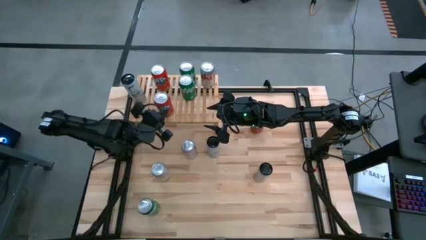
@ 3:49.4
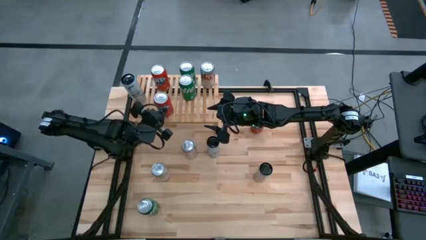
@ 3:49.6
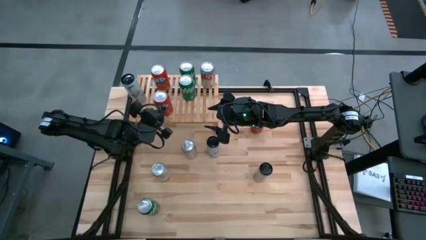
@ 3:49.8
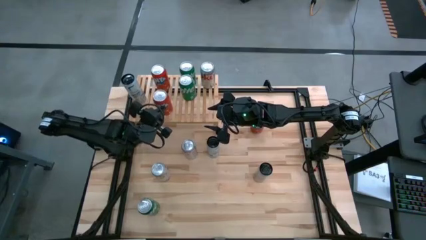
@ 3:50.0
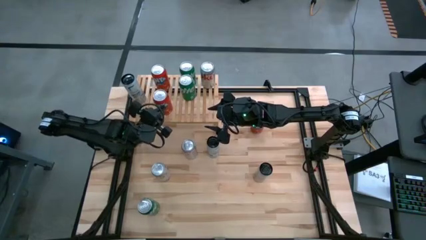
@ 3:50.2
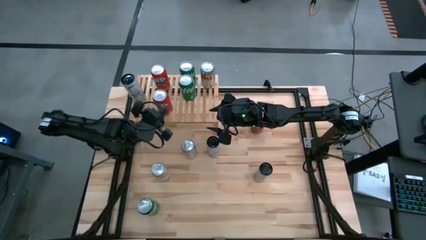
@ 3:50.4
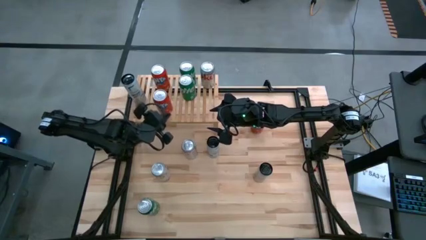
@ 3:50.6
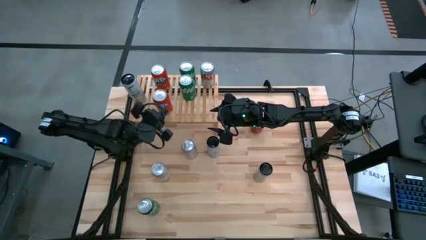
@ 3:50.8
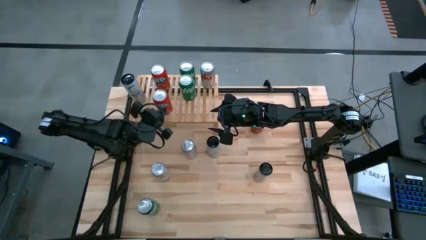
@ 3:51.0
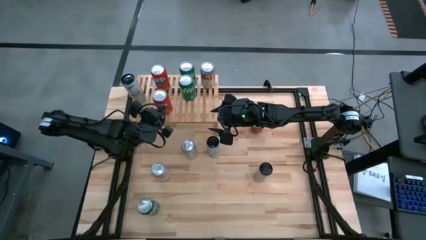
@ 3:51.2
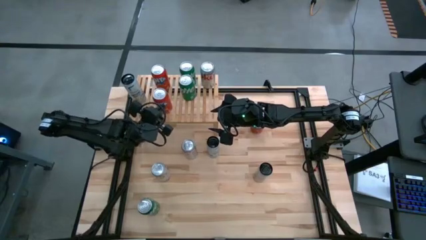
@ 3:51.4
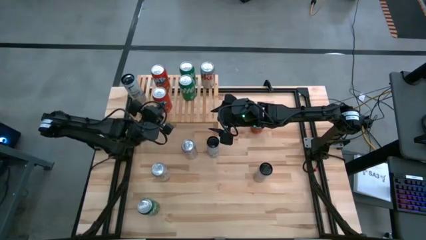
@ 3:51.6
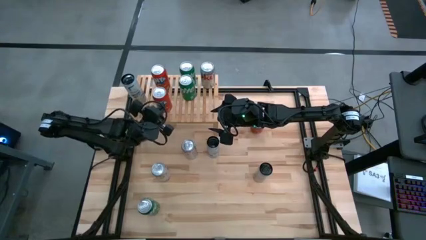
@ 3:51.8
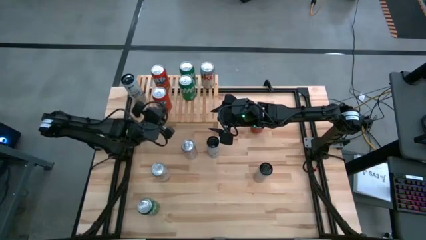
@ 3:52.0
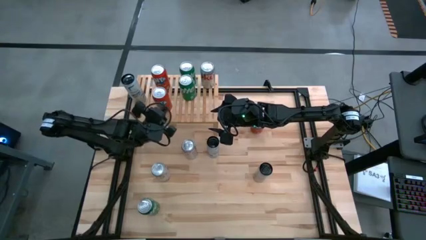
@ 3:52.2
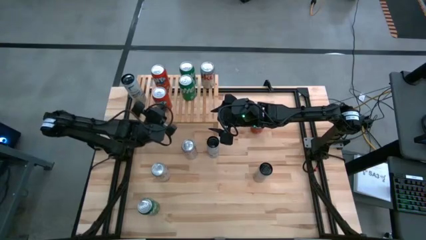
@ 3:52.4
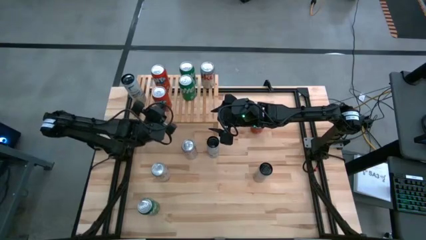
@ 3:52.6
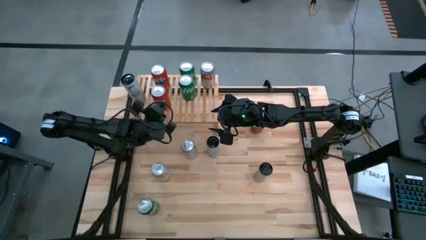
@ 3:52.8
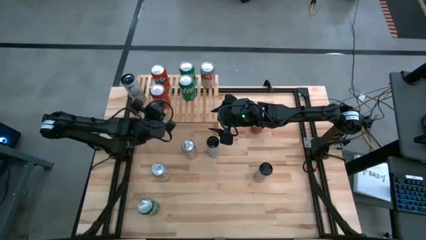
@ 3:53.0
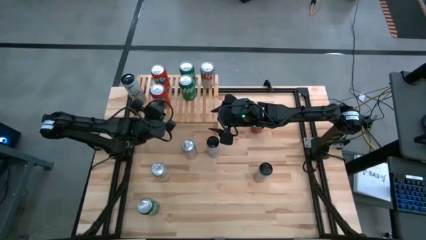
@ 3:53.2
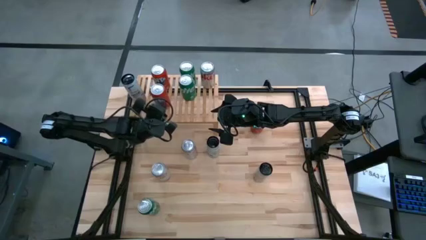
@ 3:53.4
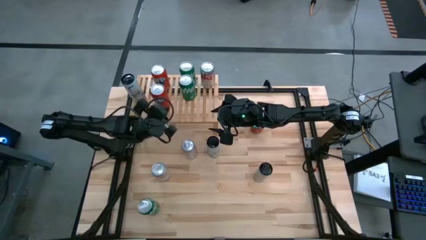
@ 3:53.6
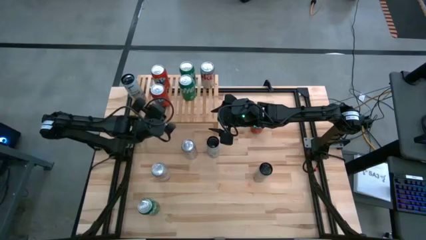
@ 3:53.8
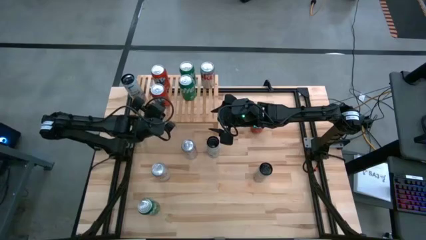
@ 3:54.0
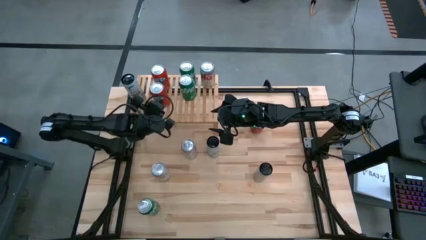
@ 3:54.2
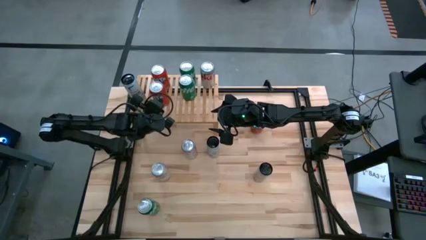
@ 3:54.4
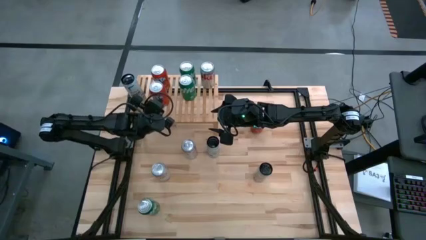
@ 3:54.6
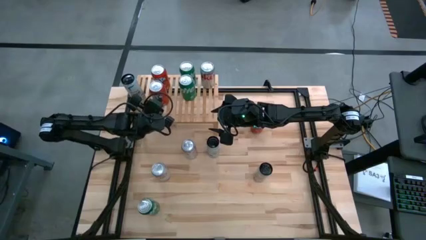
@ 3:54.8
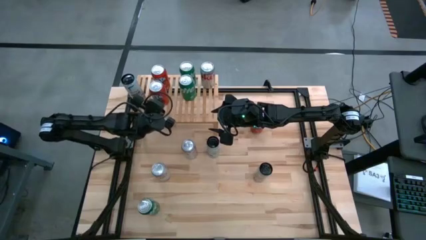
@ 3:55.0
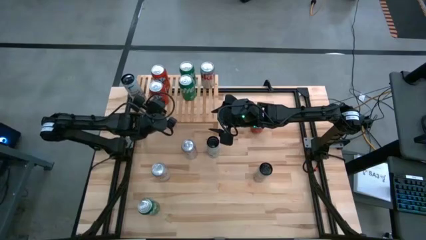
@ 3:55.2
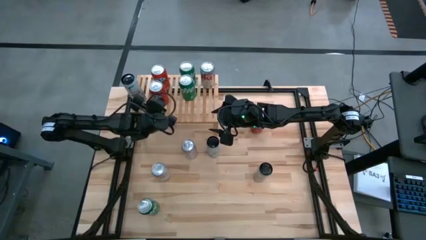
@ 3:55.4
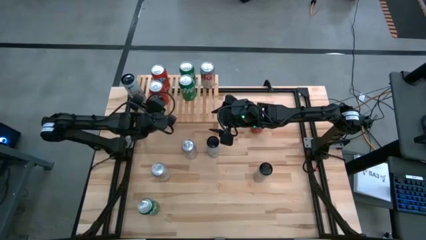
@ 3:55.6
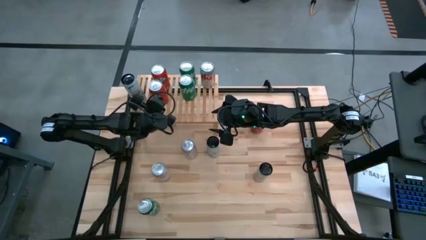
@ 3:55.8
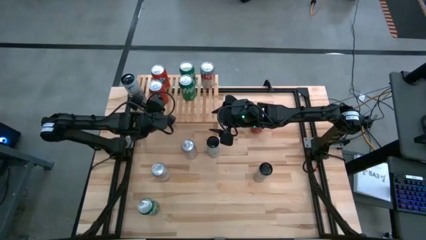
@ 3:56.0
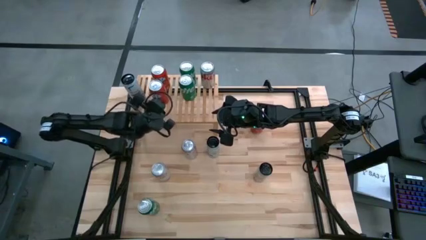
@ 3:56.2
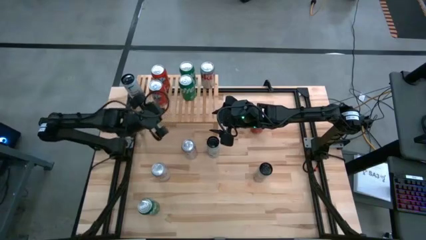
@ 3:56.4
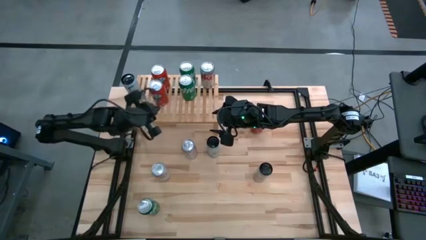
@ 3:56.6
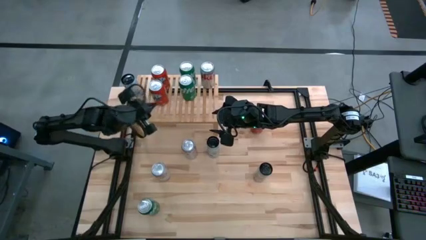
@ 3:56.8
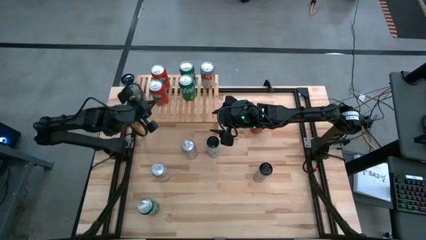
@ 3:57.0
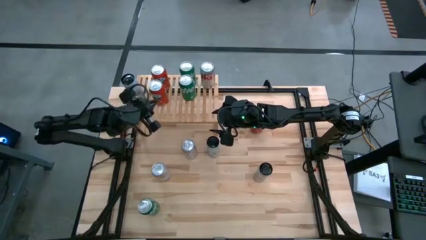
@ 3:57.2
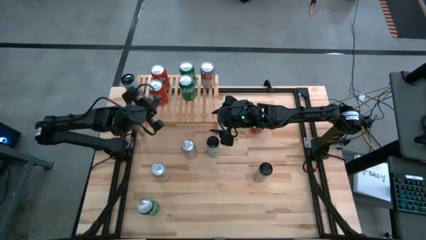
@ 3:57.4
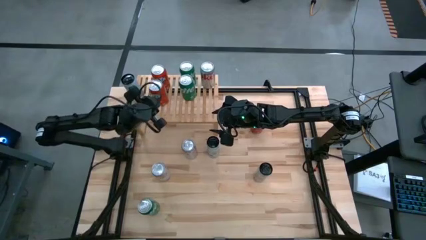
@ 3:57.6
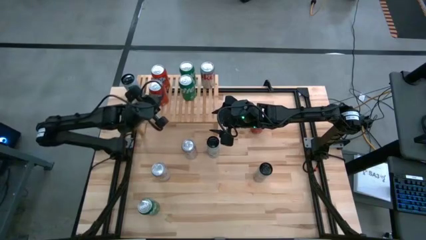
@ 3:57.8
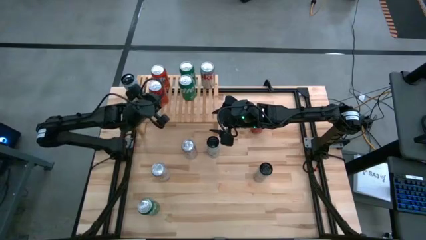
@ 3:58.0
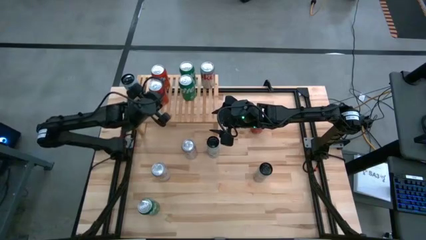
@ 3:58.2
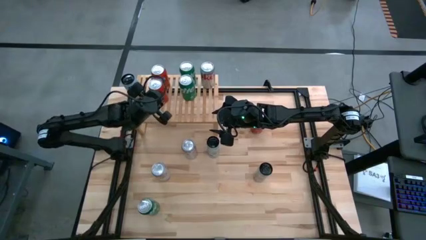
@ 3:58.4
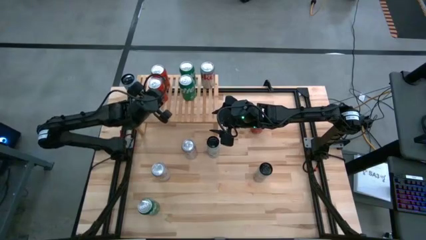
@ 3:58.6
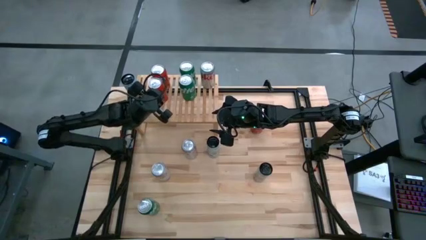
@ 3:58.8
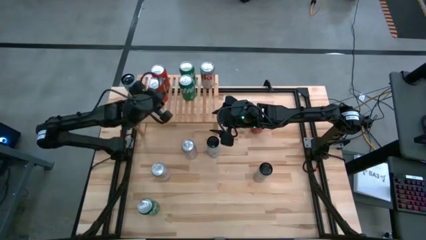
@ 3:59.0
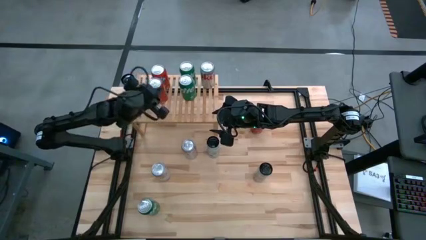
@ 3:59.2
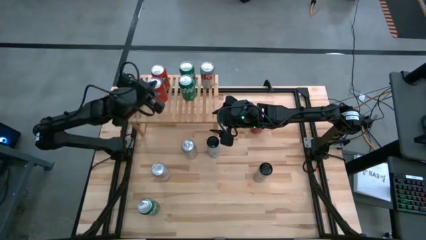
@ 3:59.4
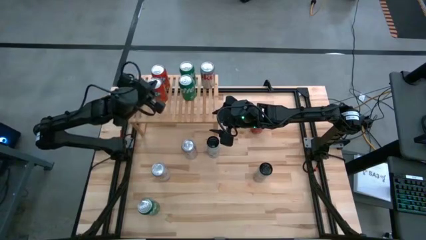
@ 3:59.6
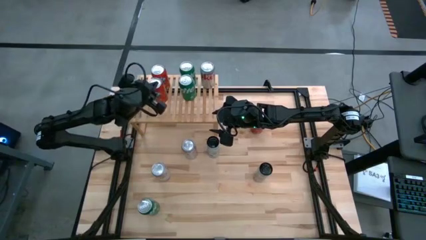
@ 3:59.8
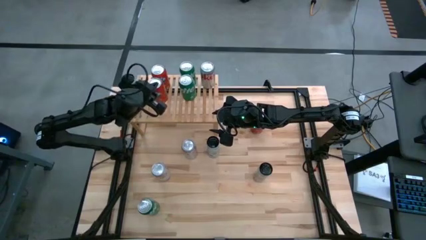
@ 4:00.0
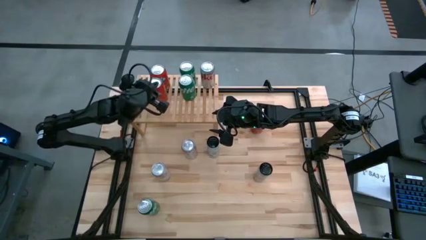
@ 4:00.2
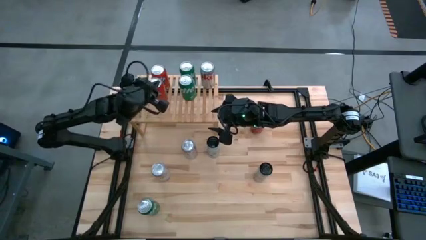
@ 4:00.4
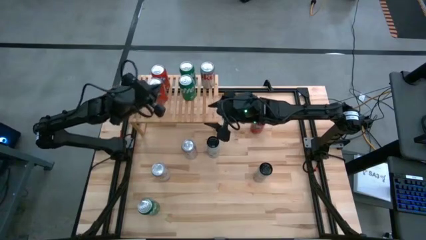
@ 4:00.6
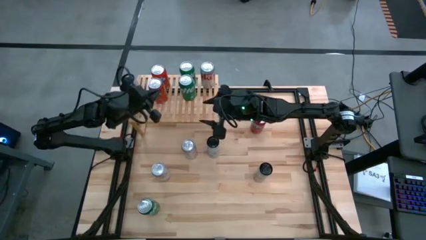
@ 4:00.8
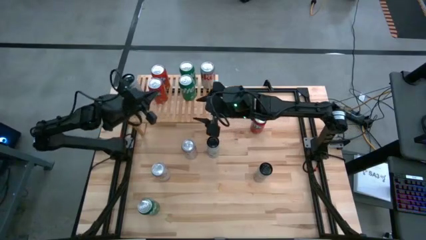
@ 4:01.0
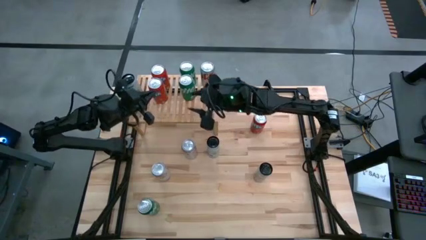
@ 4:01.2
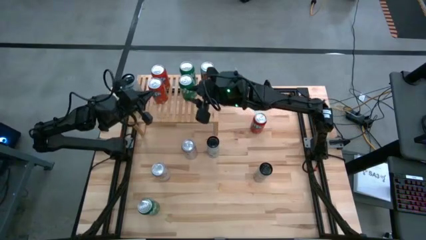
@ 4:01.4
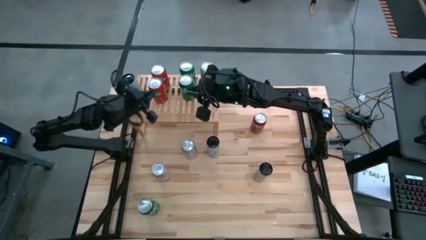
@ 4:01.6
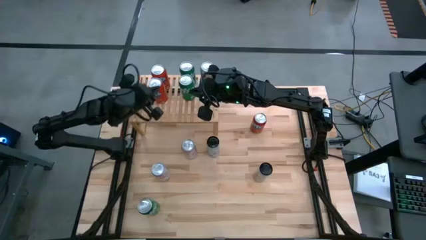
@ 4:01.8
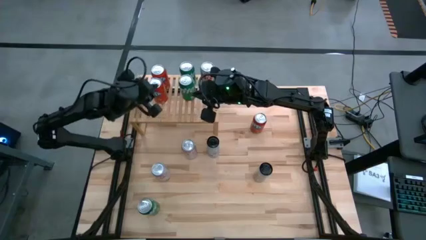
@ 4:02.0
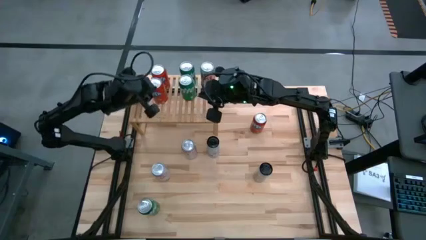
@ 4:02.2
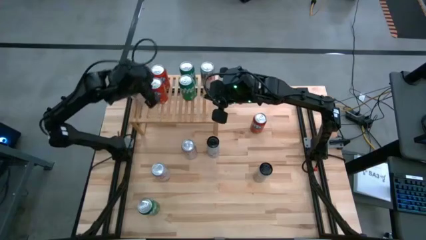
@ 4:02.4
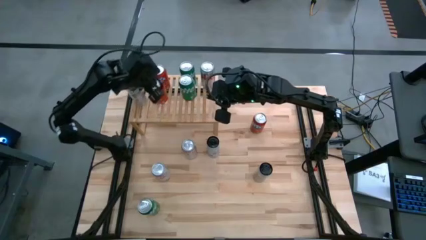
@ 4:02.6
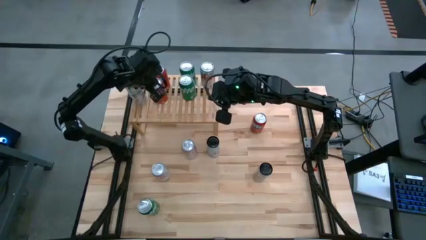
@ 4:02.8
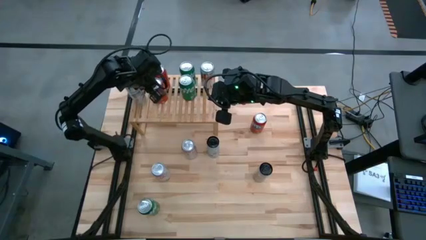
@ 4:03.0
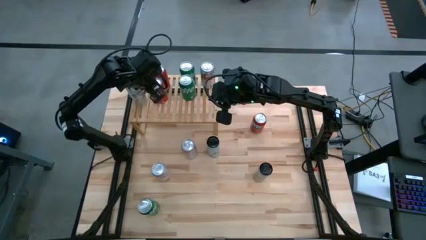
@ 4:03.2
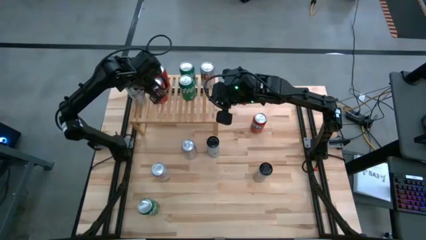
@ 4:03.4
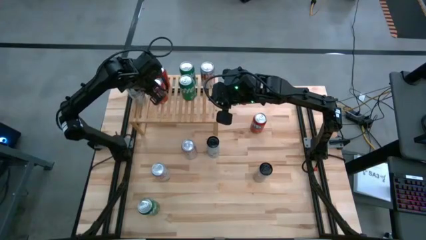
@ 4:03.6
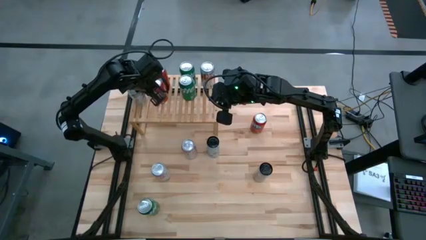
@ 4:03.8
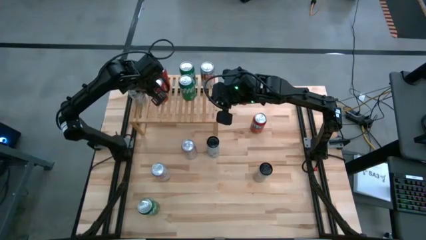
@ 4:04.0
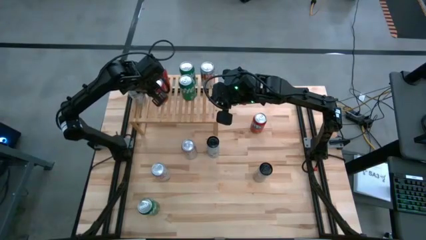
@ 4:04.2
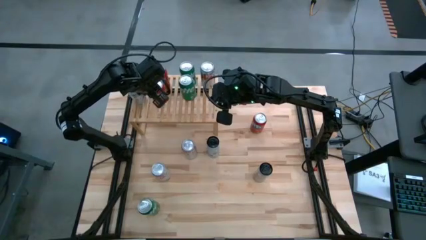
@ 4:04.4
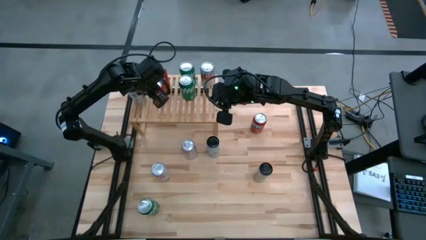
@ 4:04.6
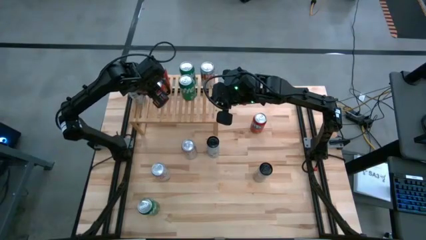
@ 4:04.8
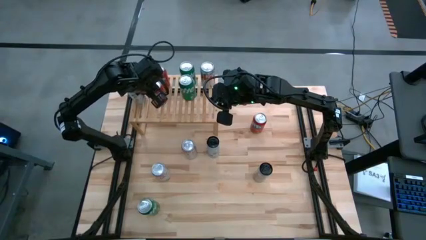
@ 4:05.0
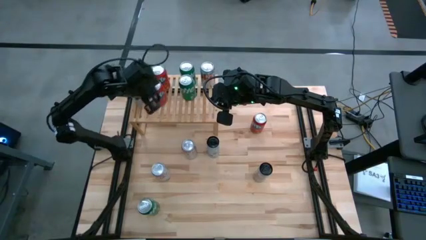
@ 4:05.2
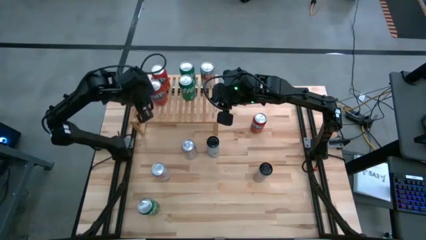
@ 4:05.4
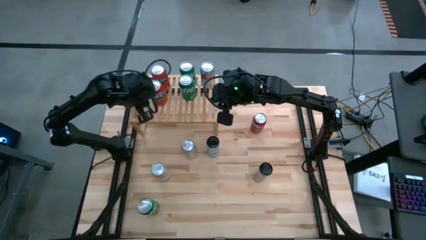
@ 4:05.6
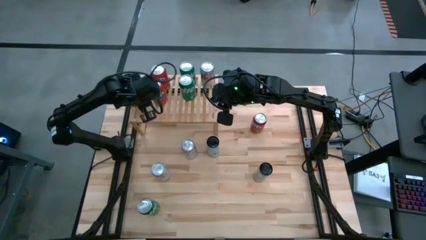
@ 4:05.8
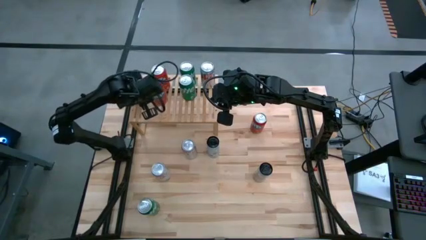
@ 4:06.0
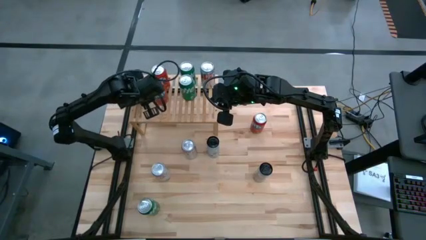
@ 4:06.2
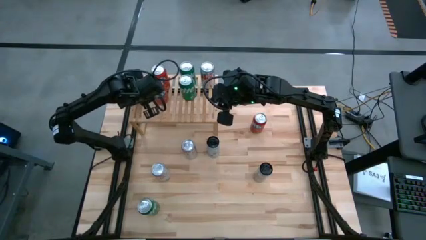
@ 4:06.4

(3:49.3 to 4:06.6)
Task: Place canned beverage on shelf
Put the bottom orange soda can on the shelf aligned with the other orange soda can
